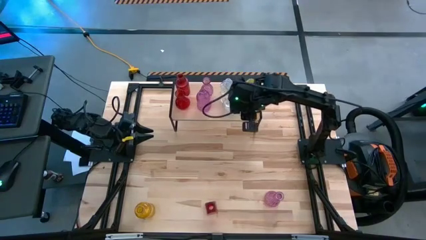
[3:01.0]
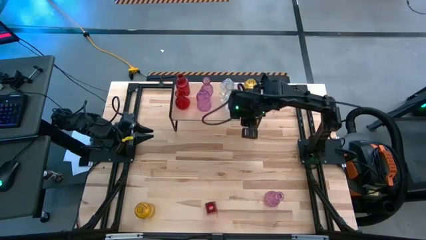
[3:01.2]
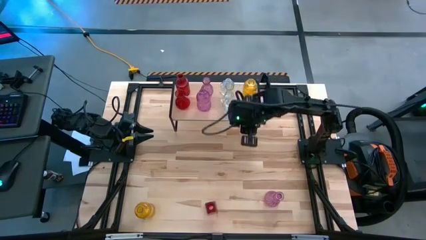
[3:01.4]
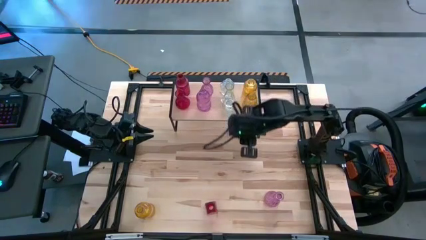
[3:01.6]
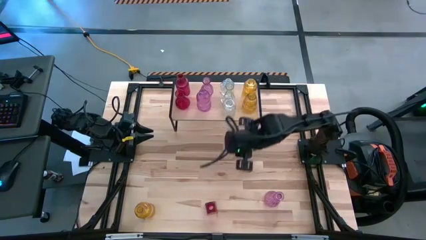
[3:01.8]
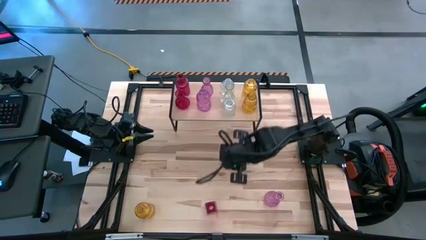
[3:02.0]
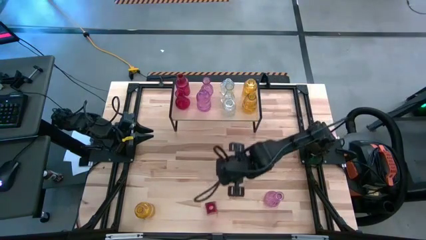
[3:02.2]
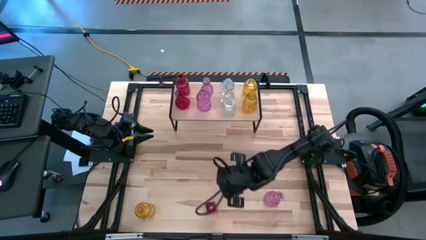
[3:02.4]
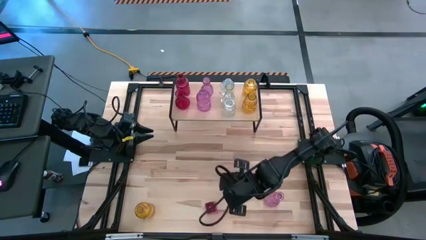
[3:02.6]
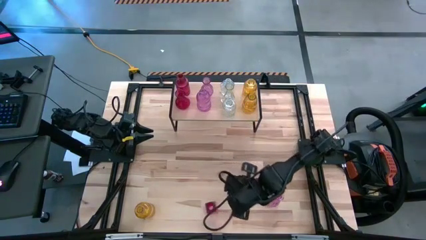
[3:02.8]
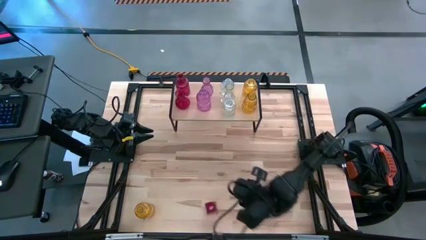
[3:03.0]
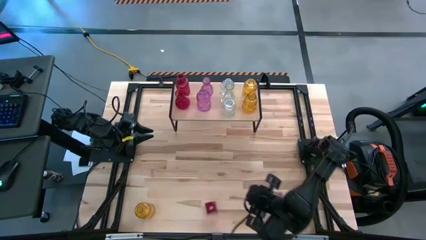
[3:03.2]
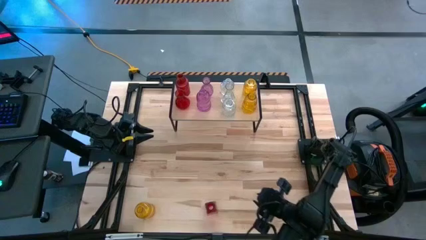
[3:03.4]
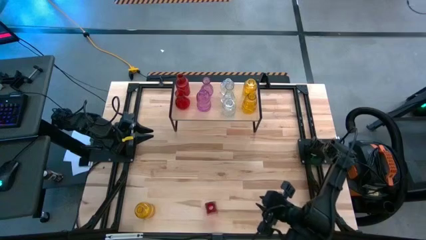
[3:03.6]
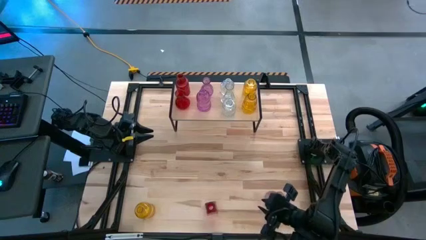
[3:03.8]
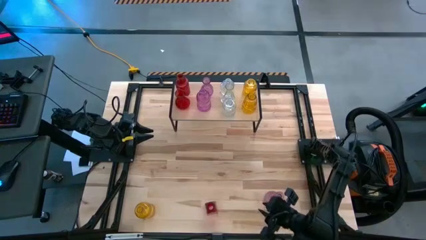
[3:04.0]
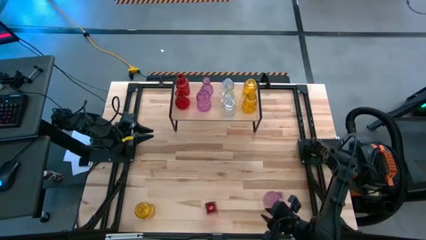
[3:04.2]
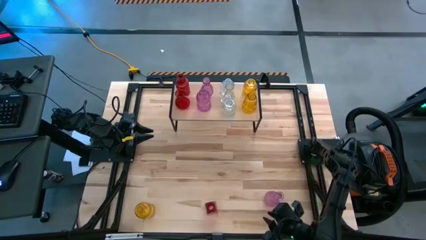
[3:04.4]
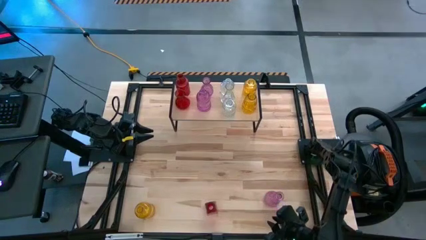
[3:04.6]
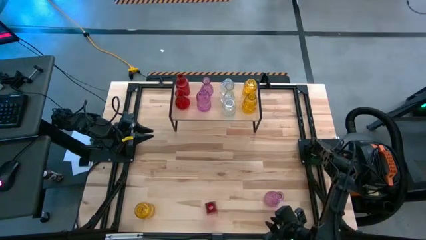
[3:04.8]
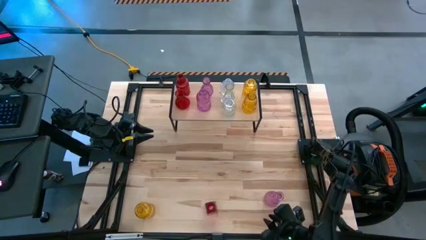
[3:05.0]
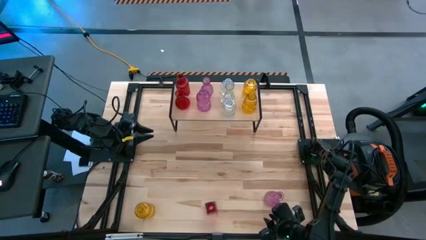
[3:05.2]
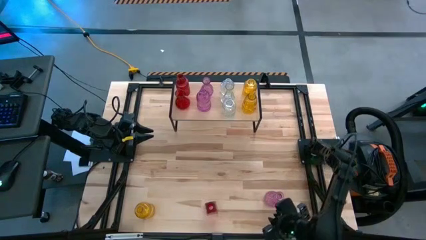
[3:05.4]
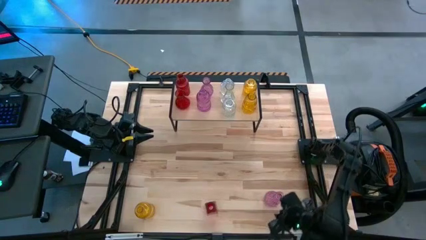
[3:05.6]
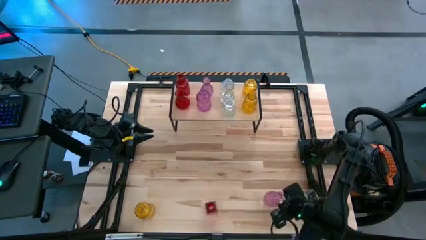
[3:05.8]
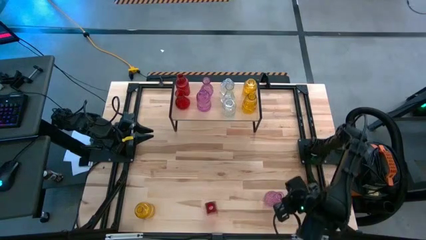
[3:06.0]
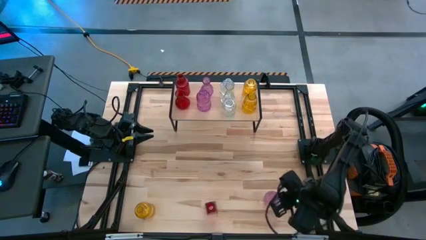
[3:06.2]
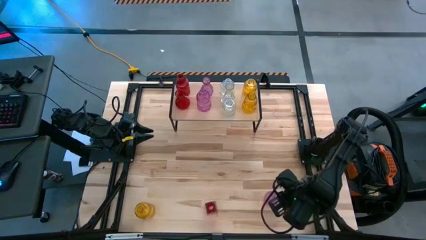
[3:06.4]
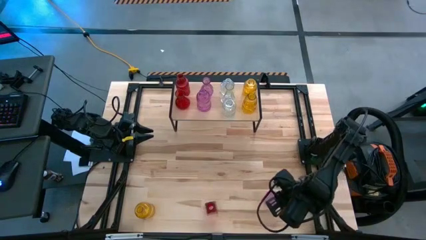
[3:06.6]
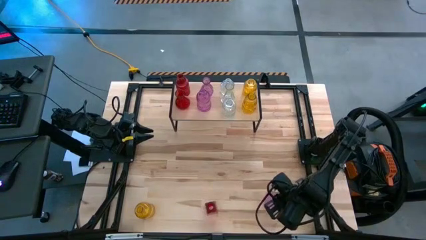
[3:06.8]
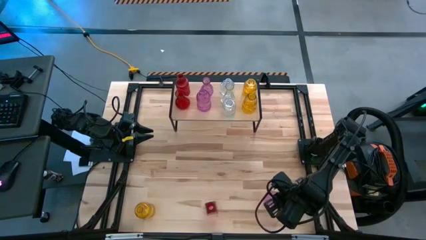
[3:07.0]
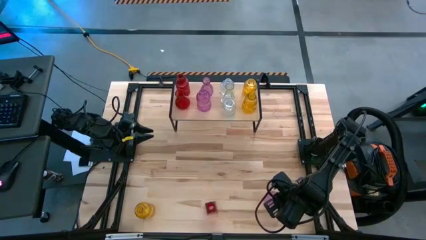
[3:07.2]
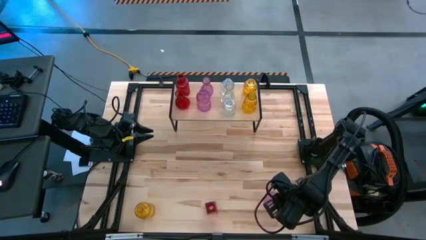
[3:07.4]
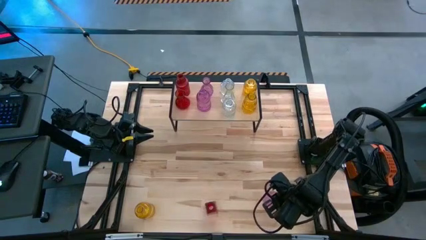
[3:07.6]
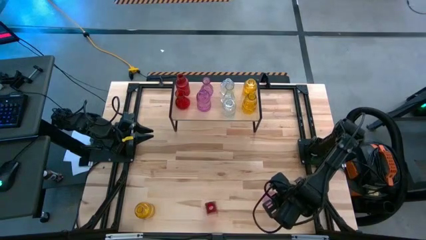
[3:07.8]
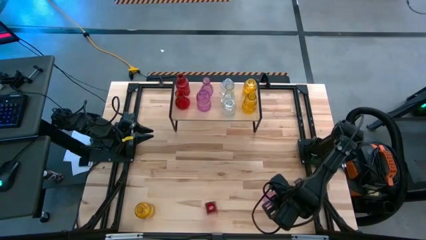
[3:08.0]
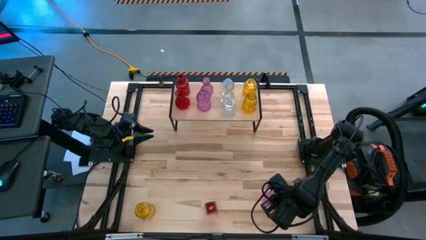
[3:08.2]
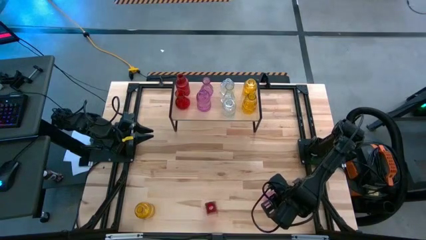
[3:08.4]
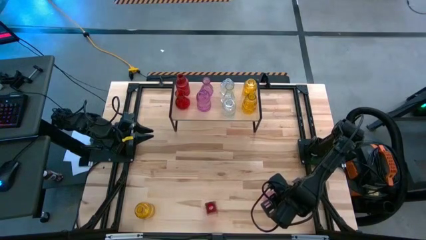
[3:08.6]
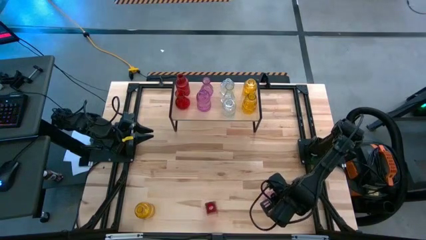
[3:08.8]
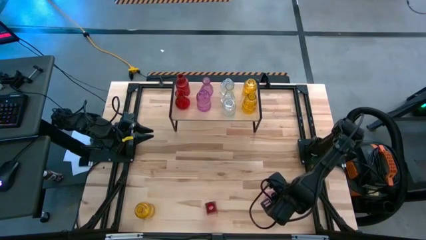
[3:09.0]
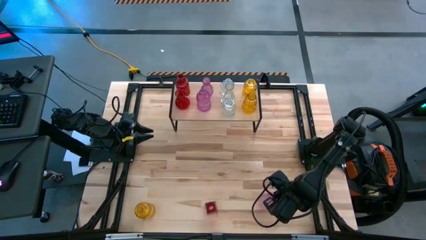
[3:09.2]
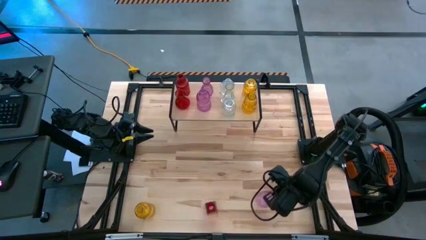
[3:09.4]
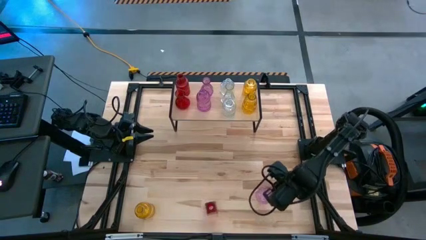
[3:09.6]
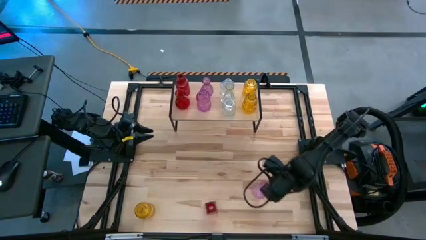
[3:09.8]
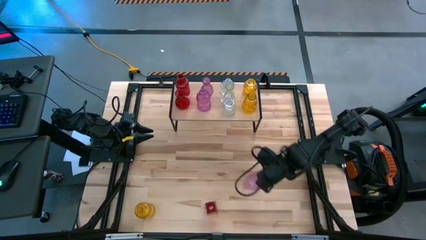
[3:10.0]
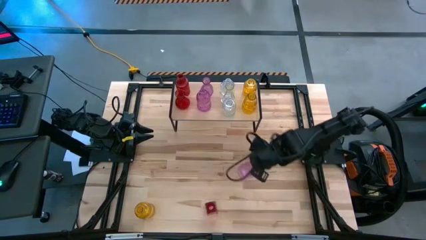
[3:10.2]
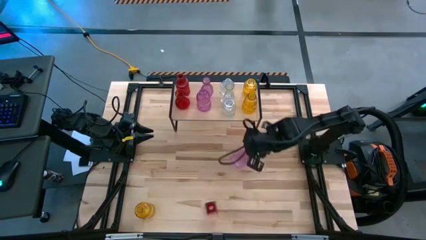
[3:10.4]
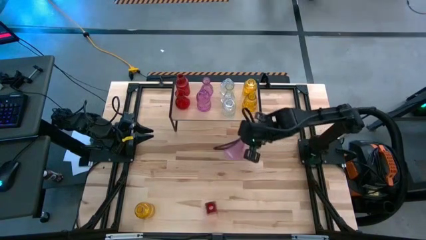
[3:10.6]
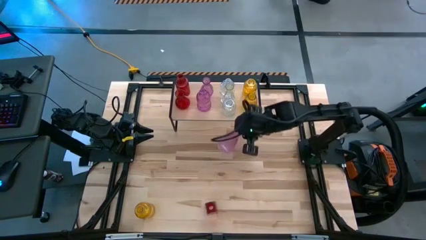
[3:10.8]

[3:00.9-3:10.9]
Task: sort vases onto shelf
Put the pink vase on the shelf aligned with the other pink vases
